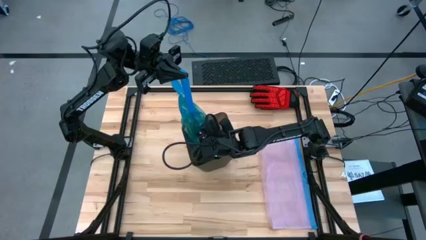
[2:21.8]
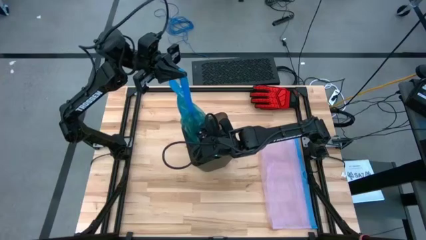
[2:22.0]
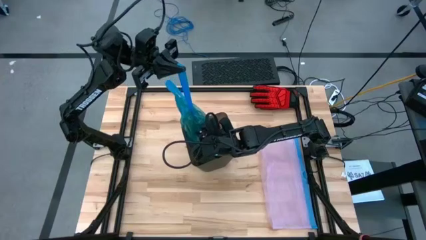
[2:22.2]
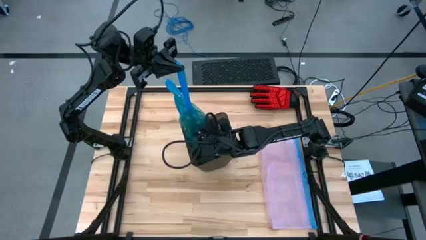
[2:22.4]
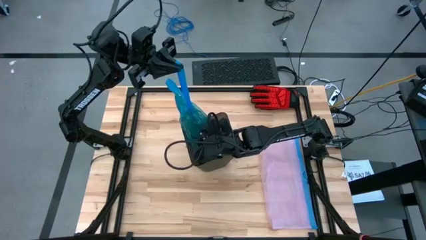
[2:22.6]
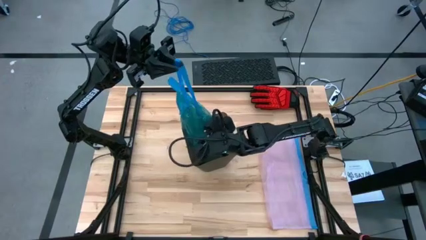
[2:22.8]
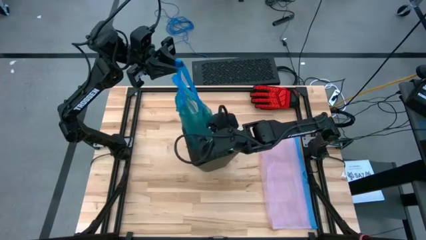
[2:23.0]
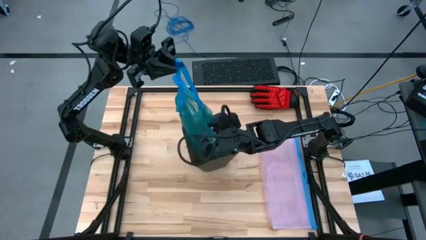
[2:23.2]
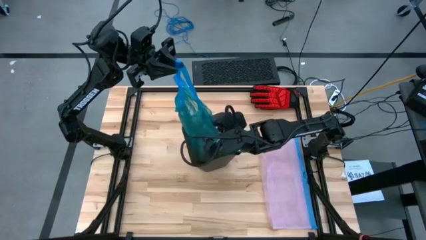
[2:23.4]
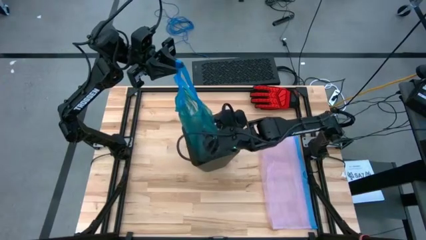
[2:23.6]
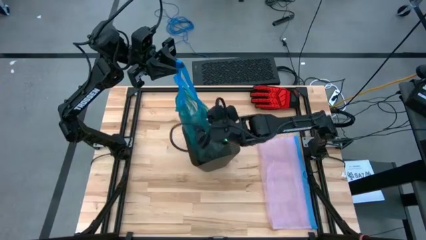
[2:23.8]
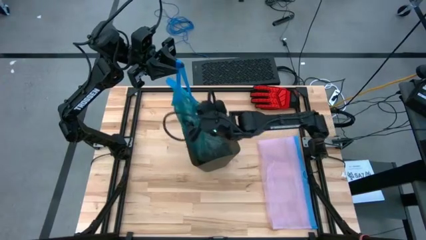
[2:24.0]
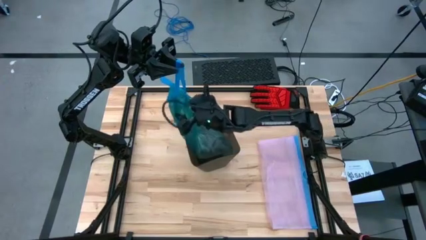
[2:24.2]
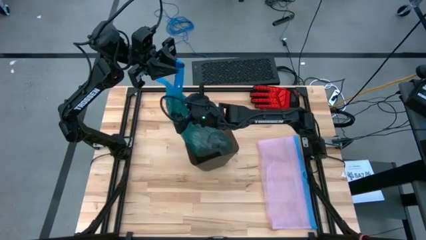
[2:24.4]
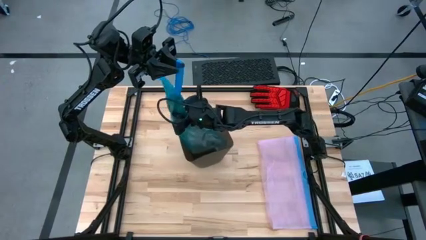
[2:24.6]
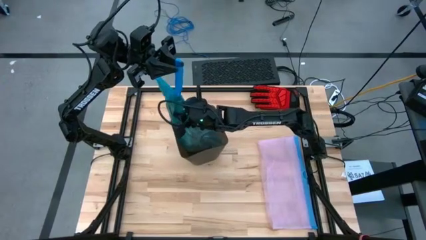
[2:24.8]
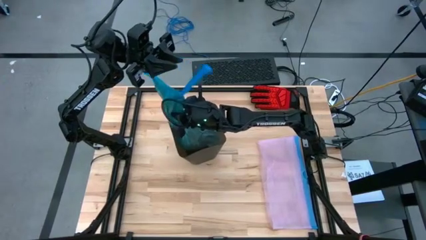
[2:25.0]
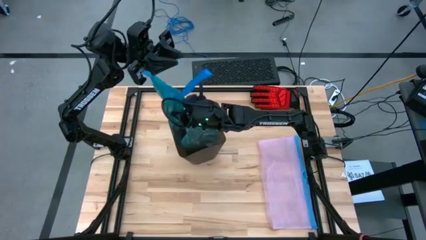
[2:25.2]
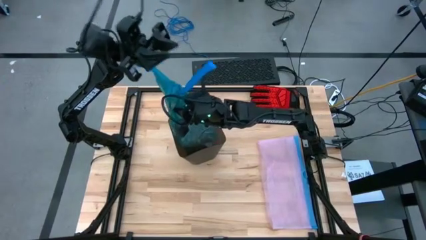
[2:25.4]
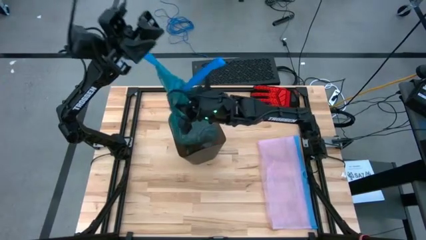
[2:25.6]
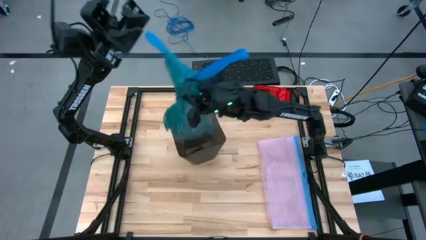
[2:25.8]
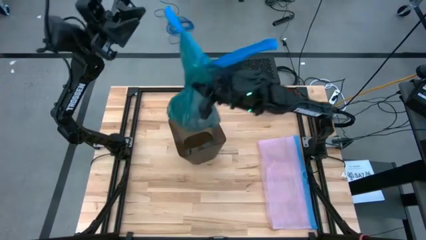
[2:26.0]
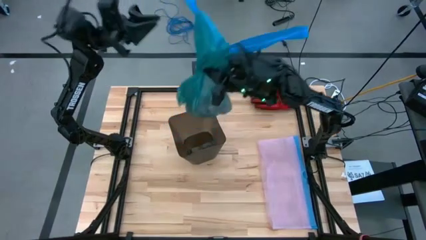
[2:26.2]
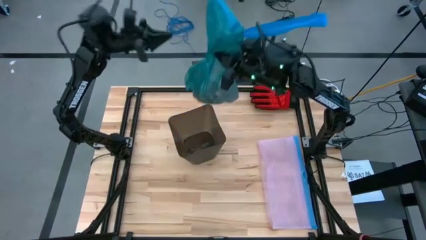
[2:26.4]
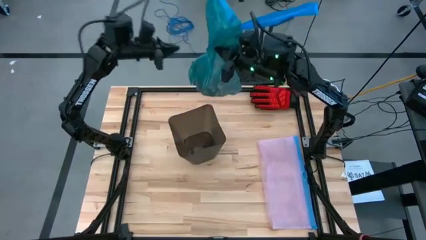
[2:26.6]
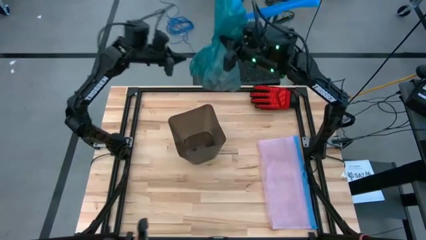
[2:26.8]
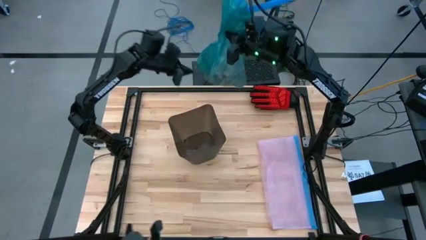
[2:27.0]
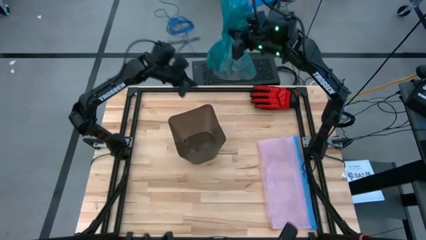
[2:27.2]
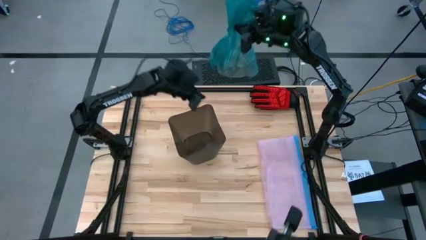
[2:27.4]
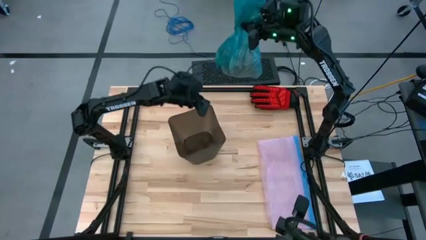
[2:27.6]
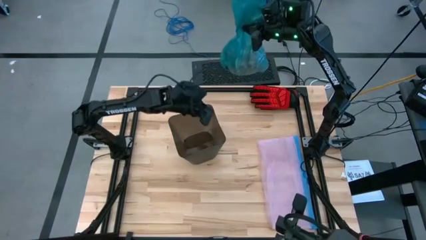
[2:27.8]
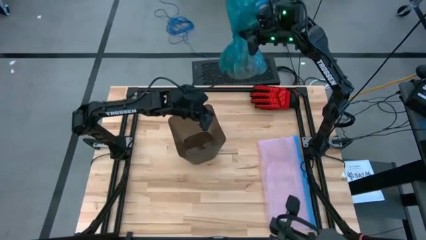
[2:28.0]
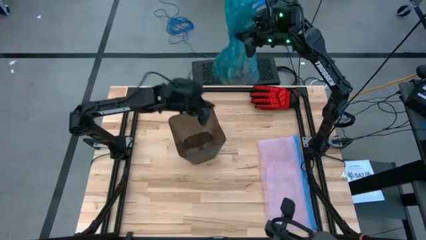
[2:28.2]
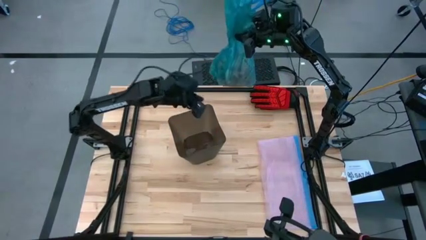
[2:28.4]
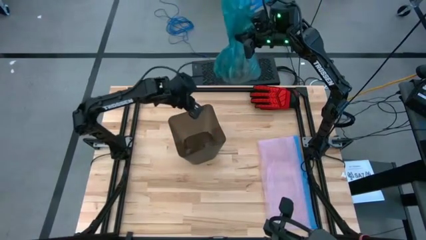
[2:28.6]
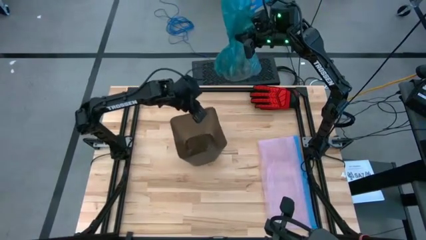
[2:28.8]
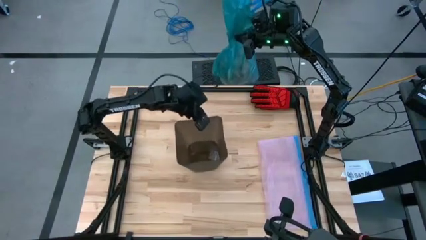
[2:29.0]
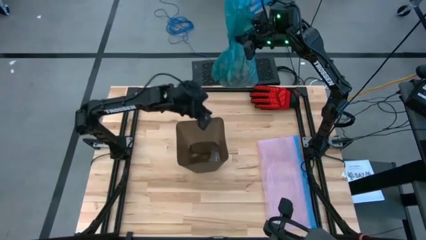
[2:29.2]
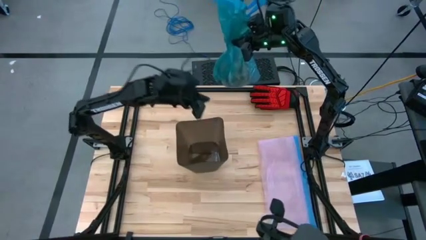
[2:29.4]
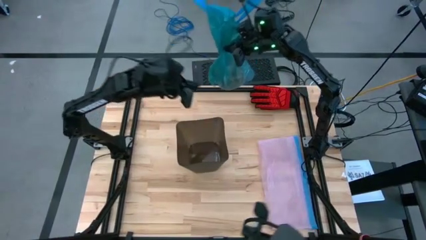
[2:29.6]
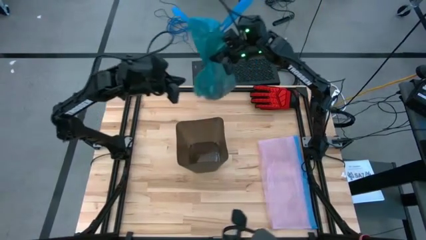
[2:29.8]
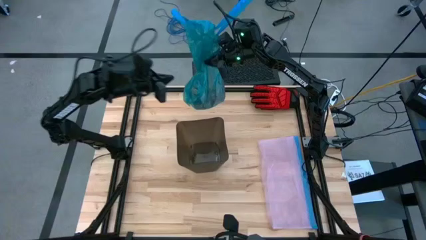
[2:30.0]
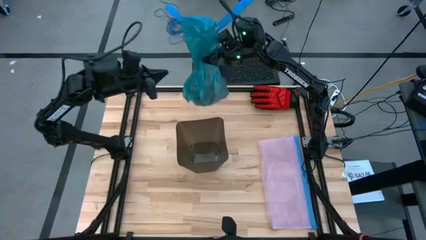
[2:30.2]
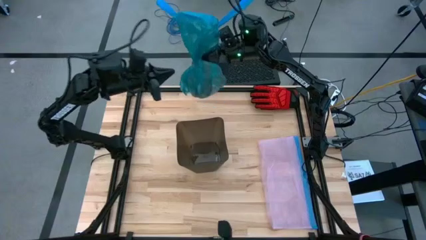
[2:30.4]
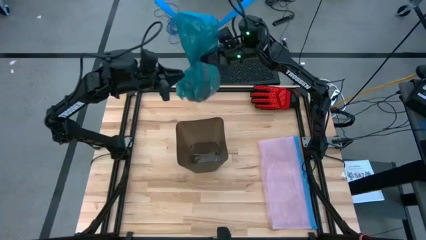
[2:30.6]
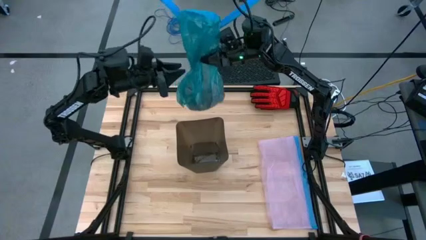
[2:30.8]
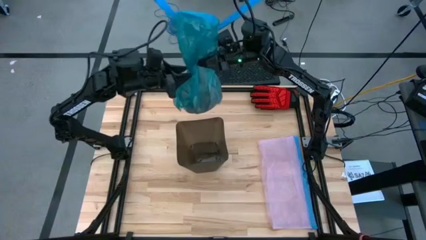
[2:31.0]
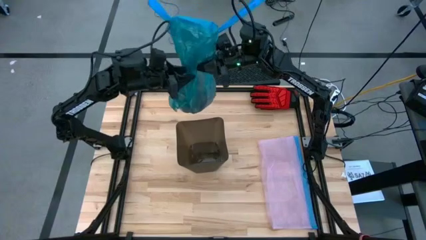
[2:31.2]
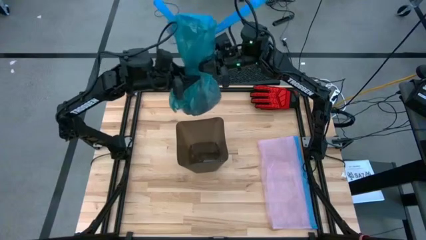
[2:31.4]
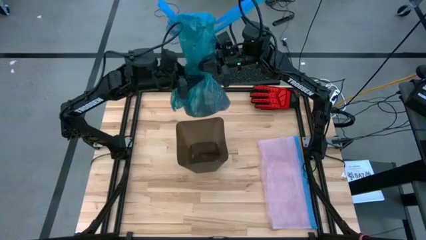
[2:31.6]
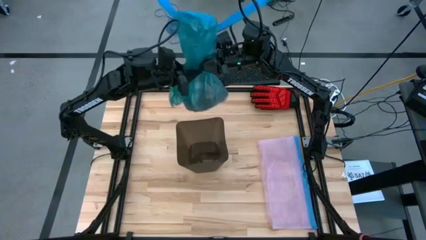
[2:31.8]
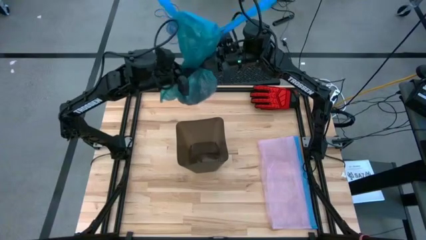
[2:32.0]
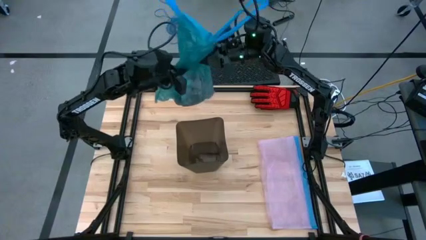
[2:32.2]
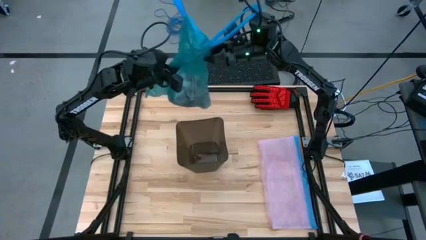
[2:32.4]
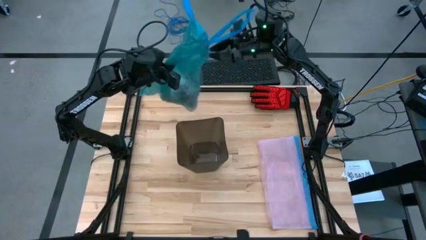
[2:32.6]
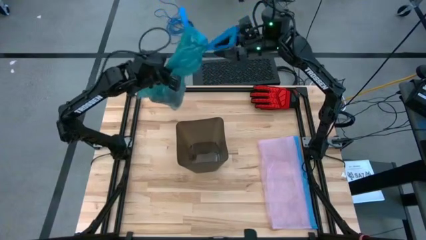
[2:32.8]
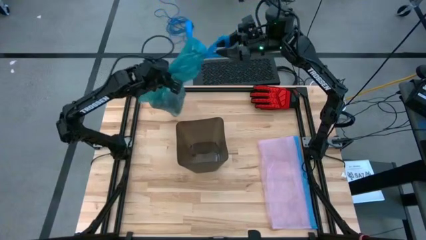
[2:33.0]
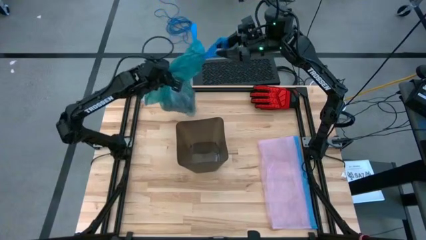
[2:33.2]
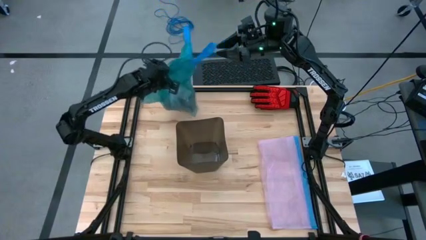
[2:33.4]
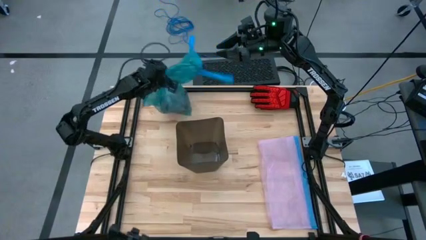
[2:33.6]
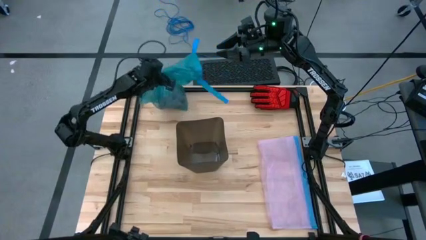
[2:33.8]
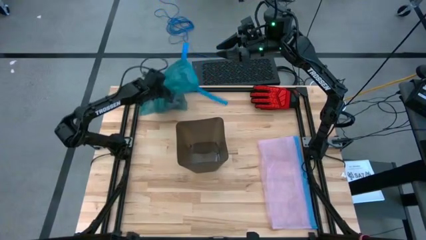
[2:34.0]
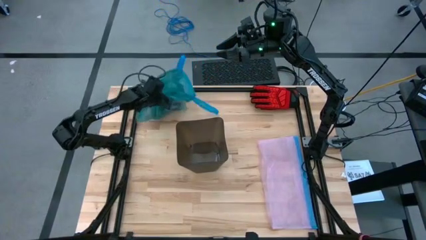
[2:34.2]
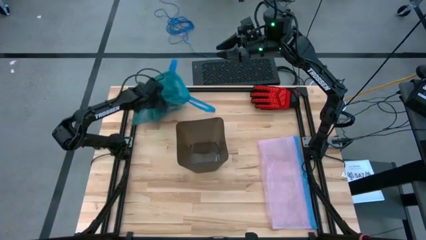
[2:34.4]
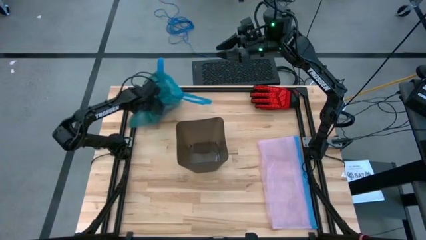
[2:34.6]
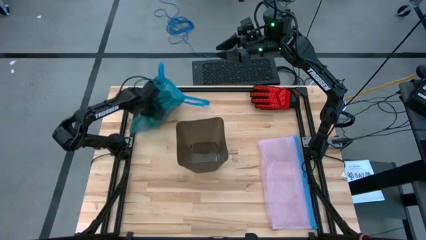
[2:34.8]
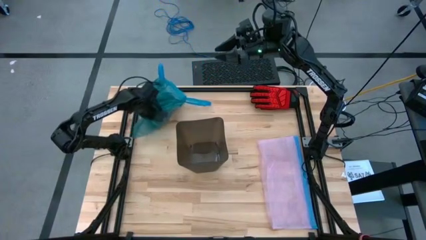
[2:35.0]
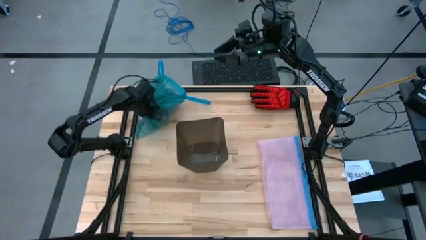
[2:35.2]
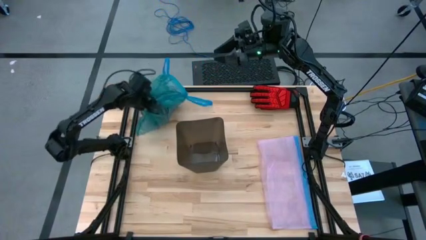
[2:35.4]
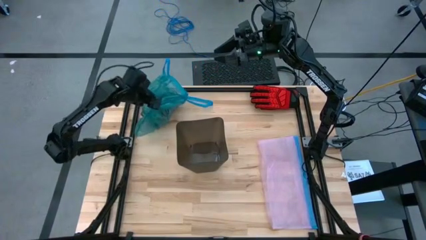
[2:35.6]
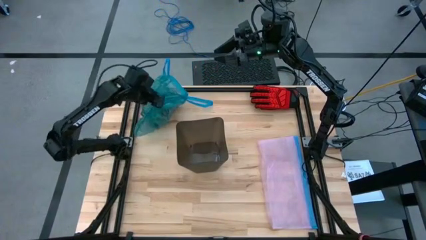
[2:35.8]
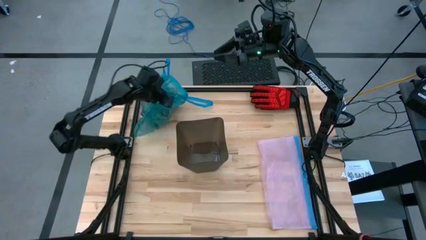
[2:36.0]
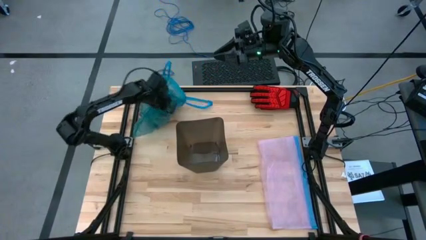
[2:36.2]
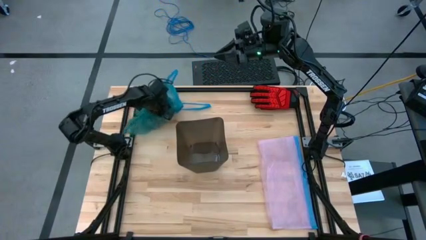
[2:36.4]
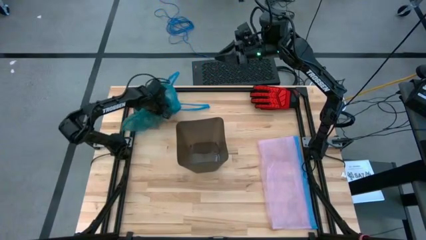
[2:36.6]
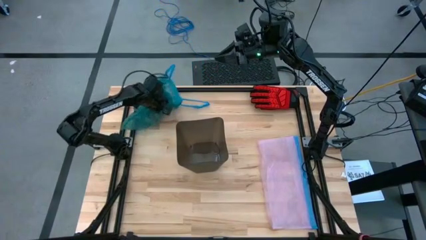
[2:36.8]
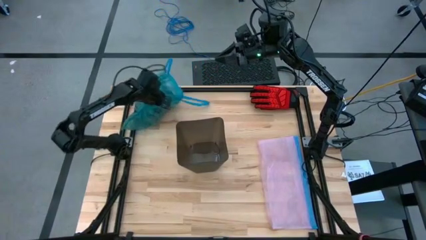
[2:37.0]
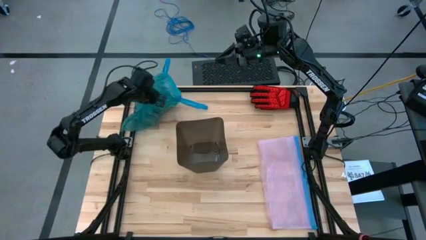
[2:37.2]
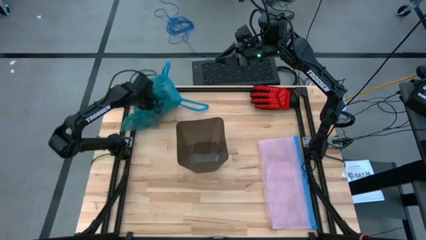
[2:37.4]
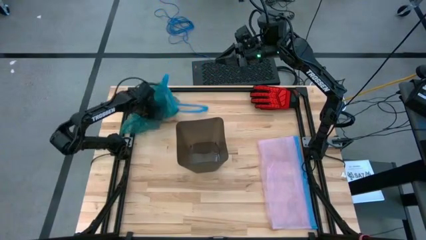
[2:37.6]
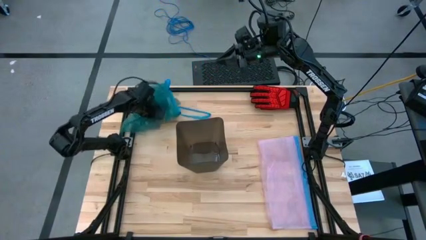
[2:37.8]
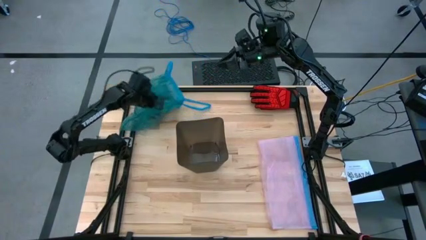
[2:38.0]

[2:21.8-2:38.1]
Task: place trash/remove bag and relplace
Remove the blue trash bag from the black trash bin

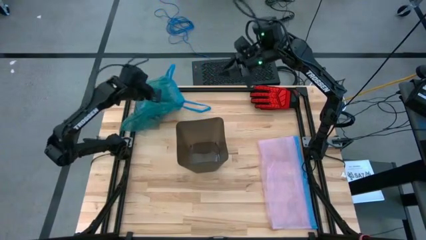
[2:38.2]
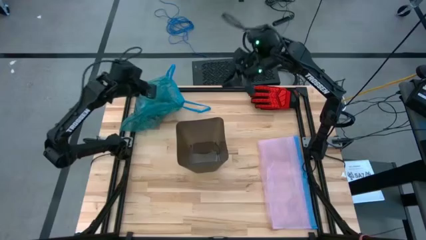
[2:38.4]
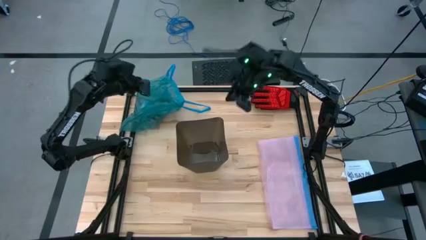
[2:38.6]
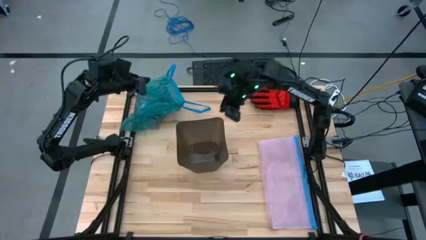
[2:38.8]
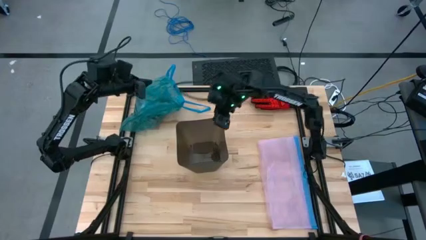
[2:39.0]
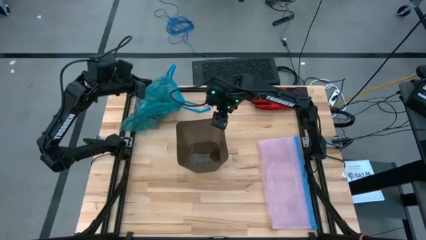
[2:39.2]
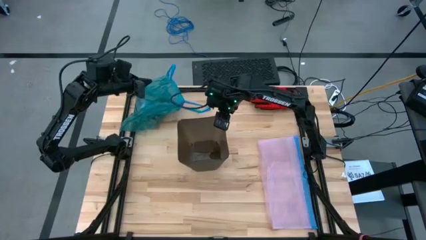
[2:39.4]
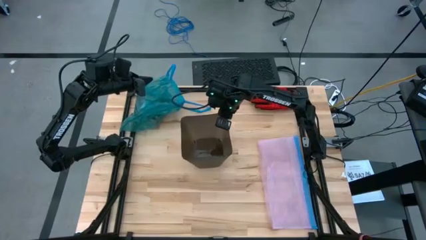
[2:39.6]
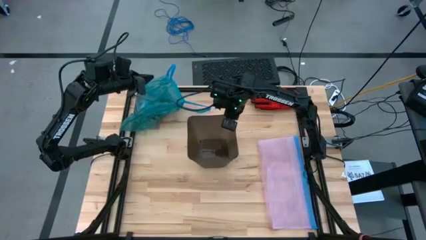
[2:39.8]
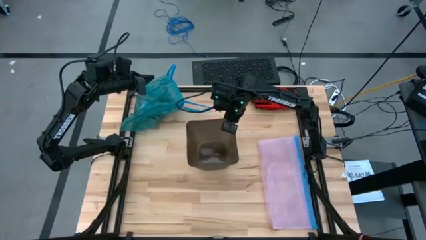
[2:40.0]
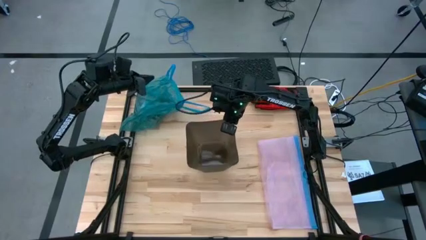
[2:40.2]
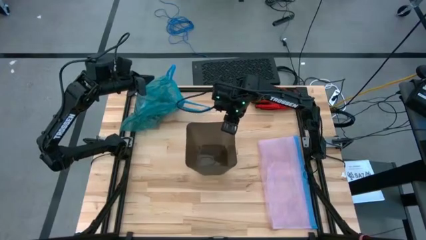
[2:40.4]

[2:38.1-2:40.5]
Adjust the black trash bin on the table
